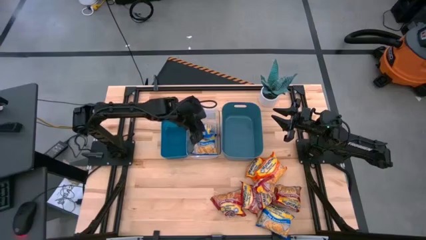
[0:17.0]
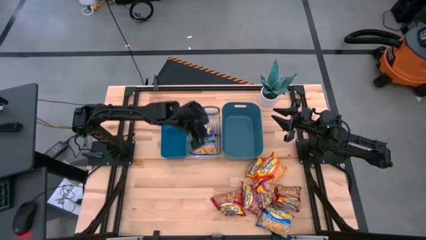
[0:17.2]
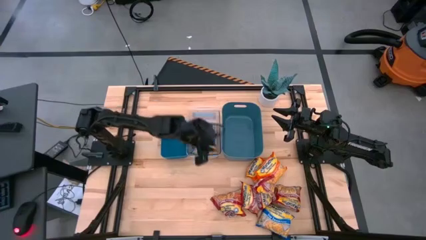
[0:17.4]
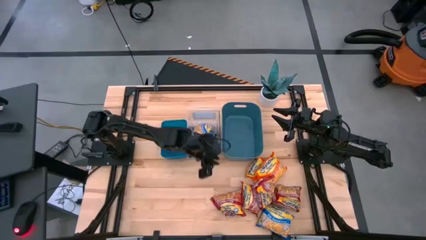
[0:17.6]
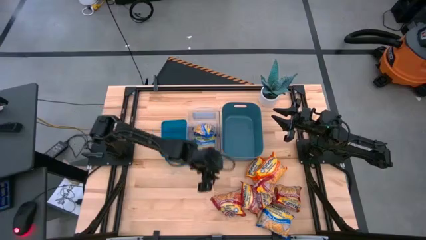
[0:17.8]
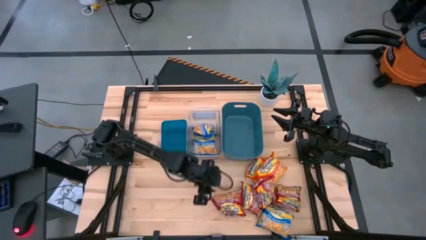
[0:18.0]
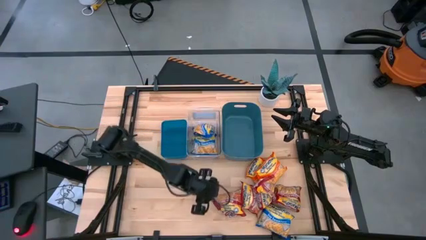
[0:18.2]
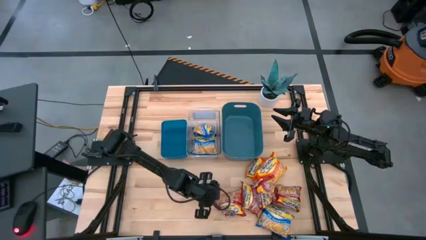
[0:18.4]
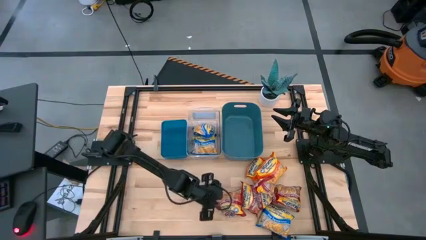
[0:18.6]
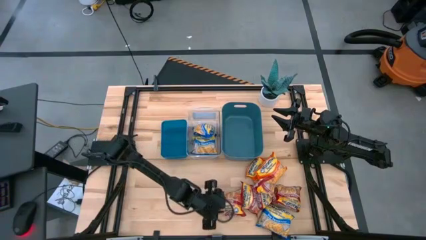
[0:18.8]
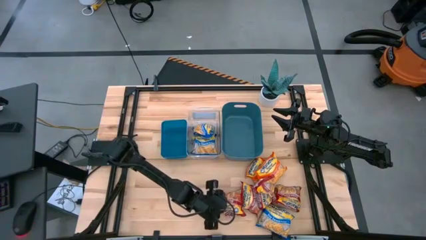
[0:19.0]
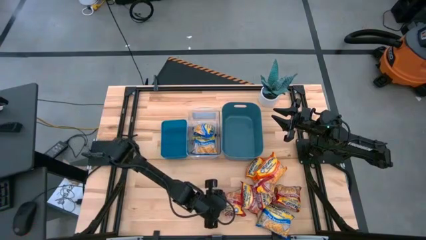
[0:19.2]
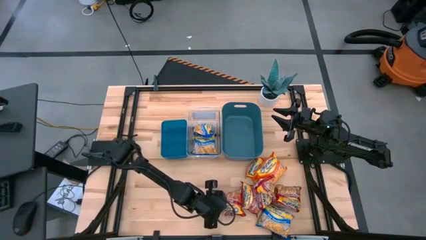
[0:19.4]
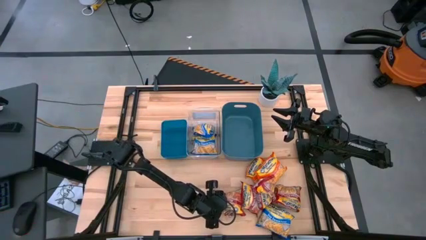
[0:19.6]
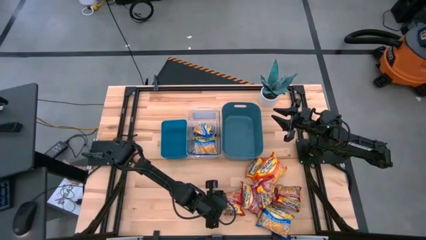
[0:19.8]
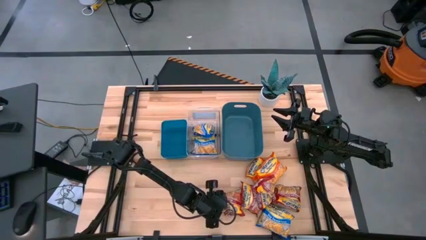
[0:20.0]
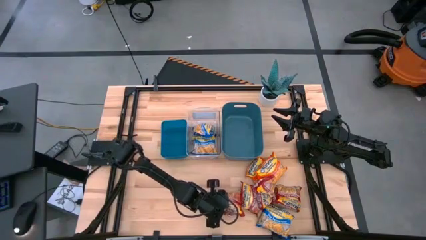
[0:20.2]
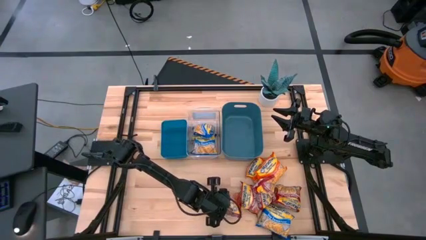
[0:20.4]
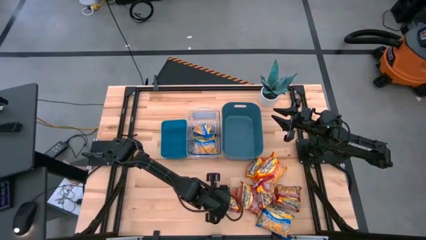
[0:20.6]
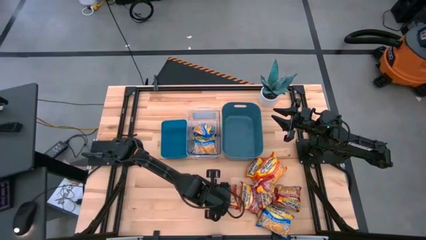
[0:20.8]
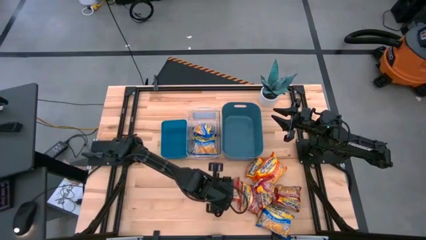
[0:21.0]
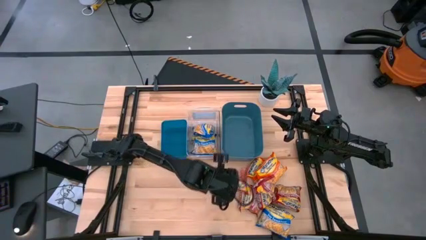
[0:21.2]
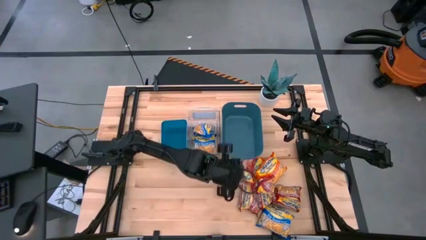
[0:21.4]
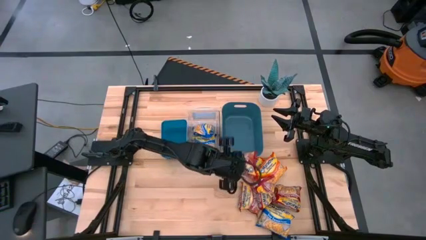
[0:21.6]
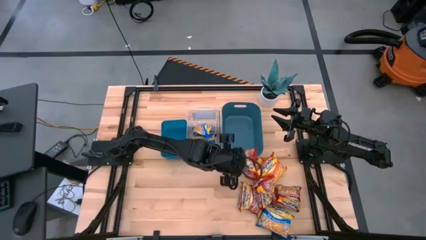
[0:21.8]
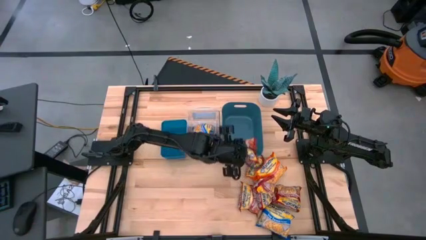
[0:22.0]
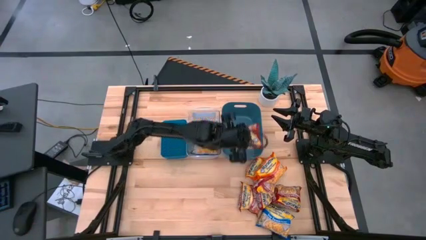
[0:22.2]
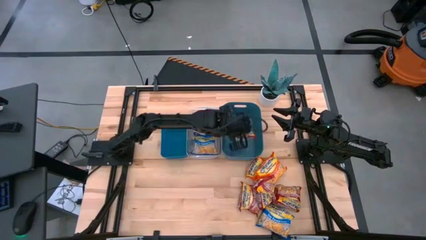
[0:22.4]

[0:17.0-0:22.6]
Task: Sort Maruchan noodles
Put the red noodle pack into the right blue bin

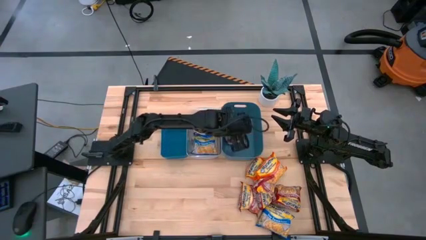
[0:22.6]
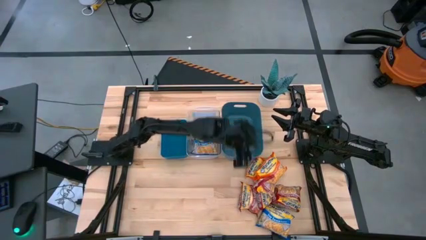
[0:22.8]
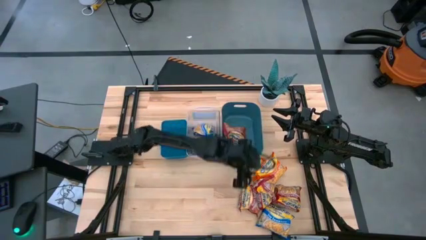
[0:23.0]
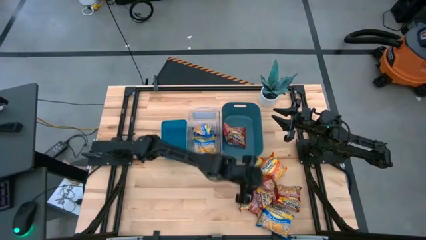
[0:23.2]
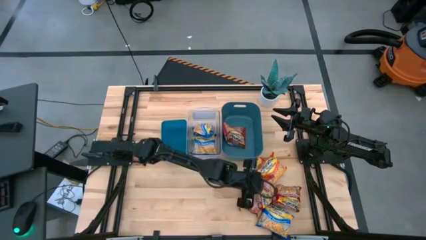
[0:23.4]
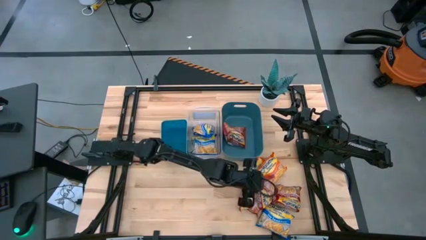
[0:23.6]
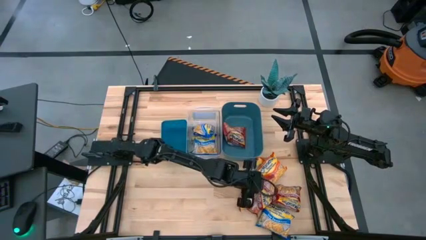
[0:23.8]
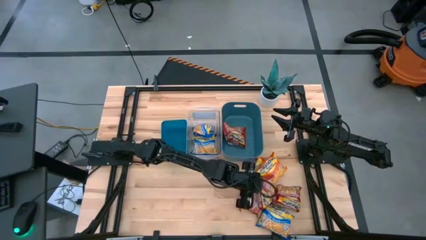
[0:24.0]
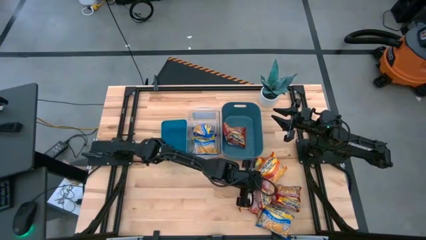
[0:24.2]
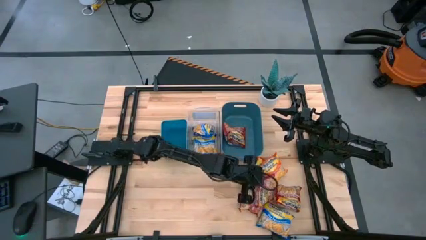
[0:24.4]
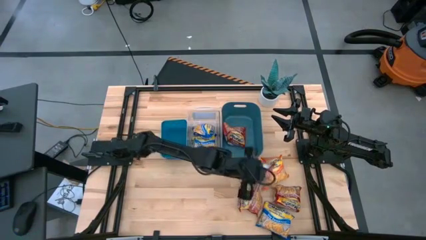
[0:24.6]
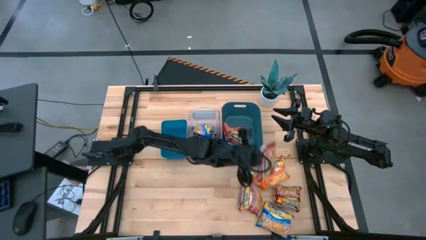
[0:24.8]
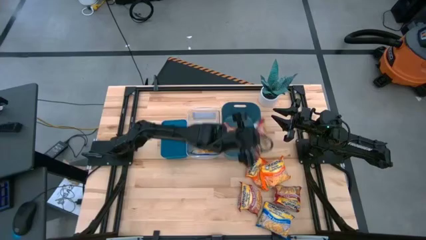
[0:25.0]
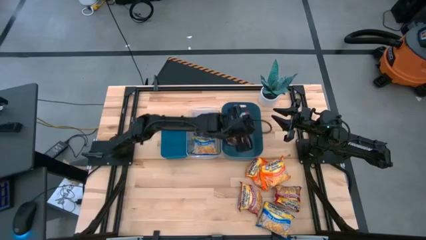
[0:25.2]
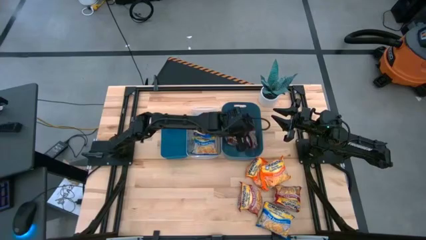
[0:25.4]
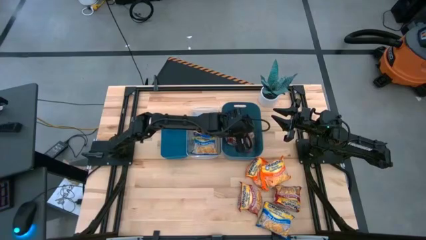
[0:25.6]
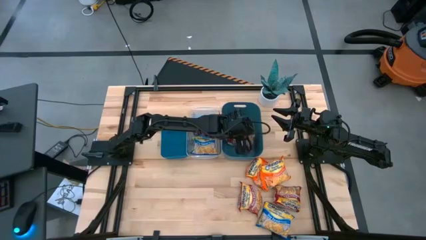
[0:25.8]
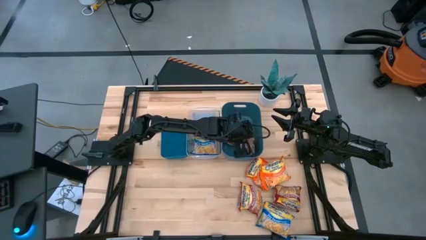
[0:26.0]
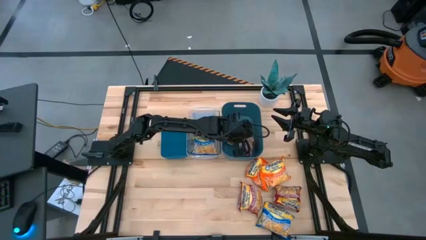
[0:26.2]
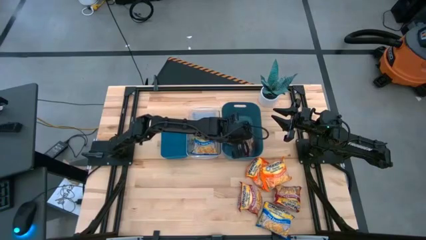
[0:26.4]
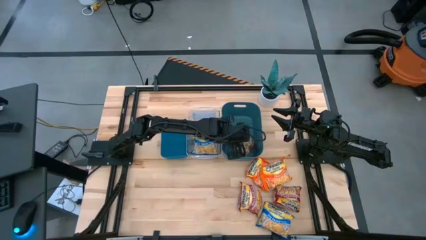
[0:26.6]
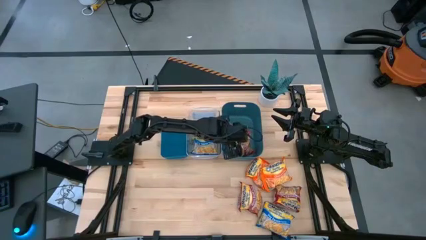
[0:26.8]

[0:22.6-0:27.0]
Put the red noodle pack into the right blue bin

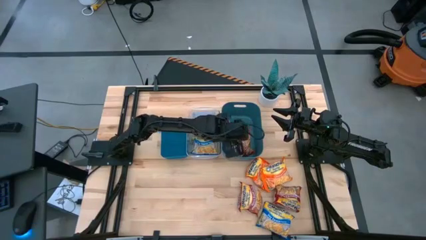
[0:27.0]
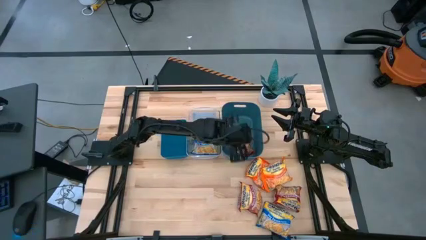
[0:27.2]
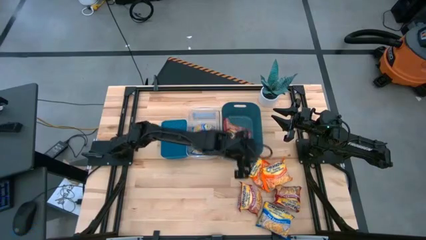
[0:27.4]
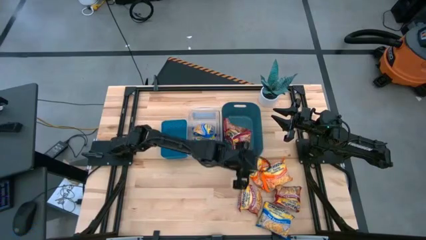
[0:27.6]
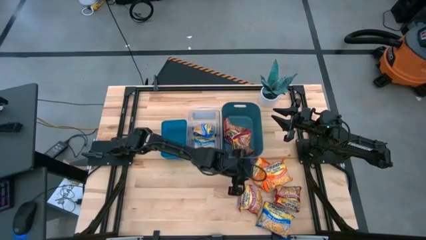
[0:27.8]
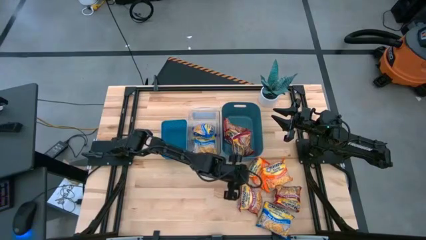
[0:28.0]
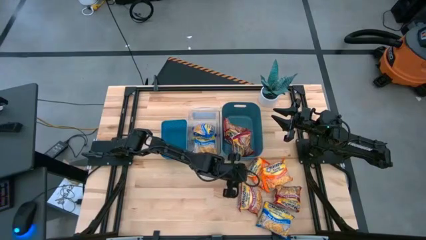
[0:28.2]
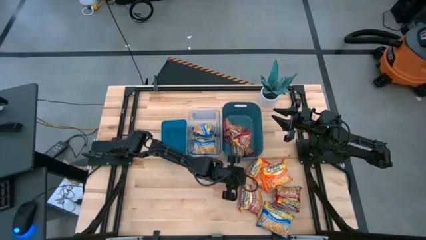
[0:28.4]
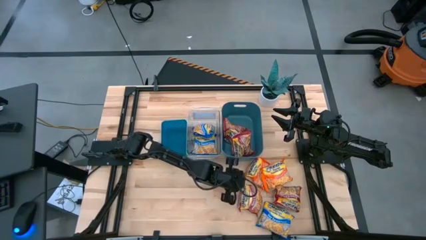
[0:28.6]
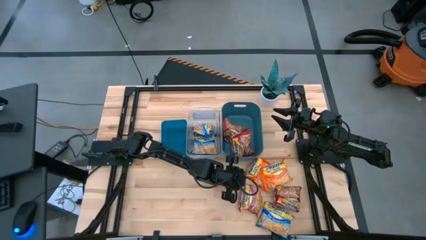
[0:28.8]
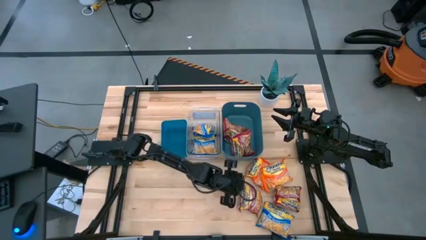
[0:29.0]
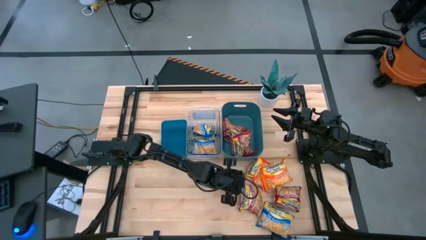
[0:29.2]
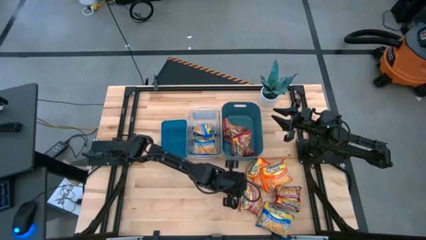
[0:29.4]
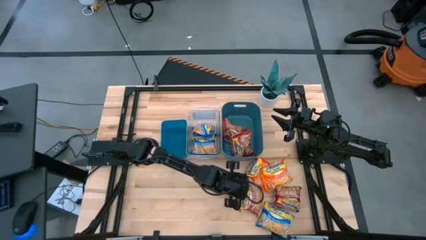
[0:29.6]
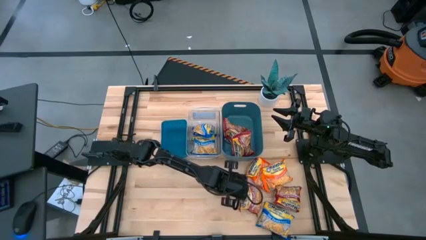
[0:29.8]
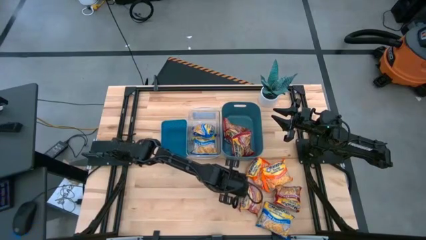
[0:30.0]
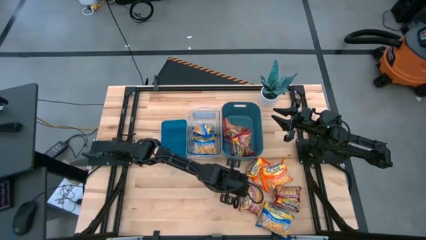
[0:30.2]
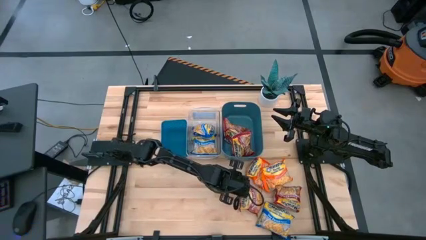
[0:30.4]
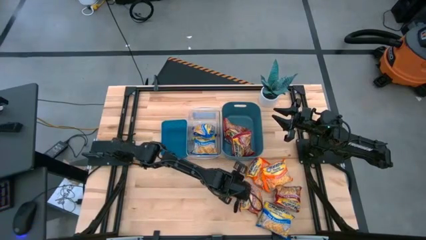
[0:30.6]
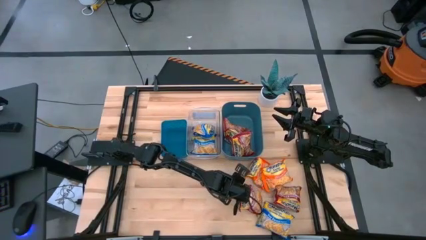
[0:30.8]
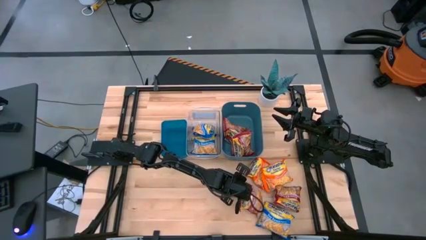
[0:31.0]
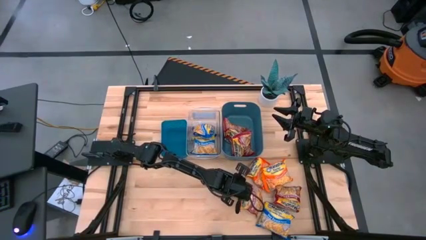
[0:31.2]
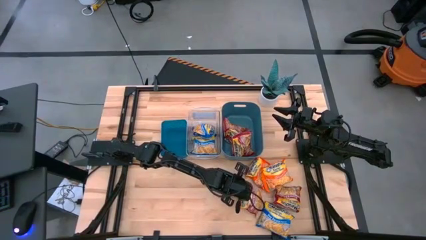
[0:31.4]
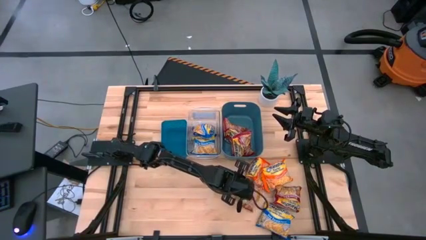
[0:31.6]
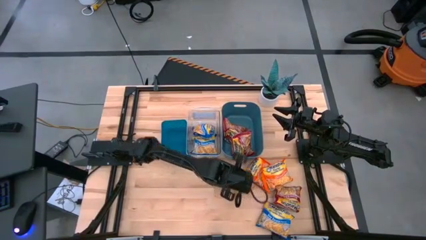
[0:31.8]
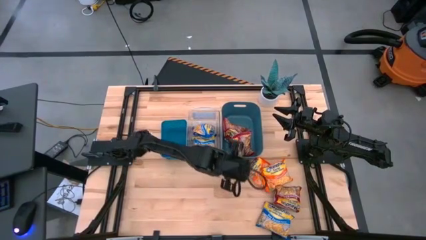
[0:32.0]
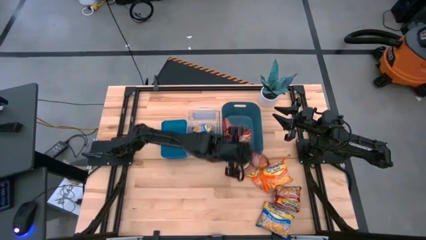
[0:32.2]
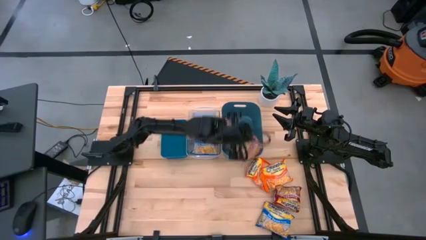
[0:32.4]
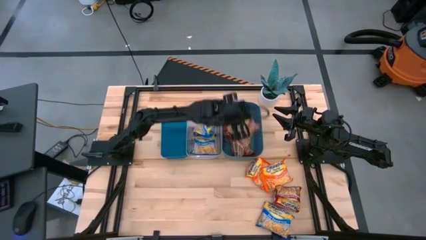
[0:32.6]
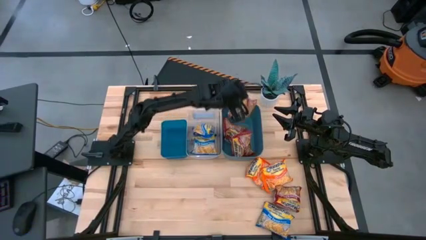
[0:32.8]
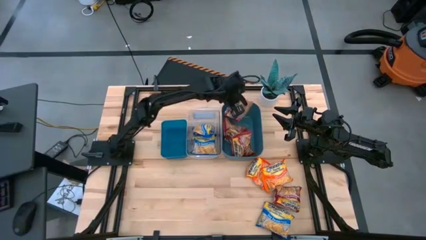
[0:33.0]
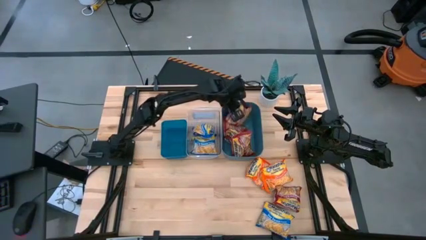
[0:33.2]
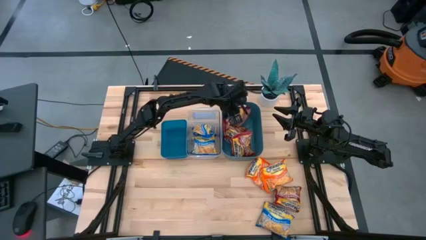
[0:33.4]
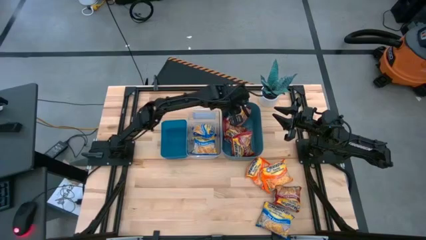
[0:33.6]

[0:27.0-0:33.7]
Put the red noodle pack into the right blue bin
